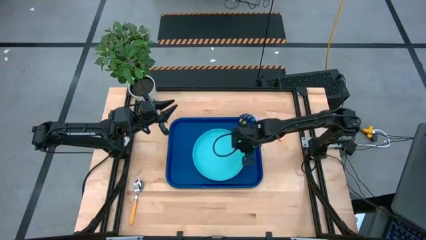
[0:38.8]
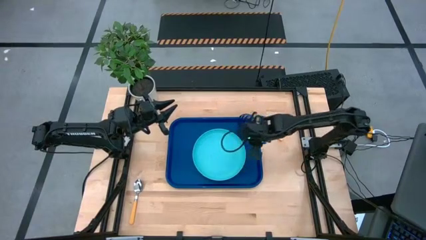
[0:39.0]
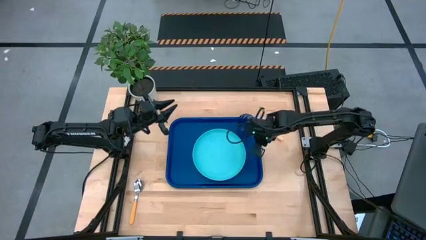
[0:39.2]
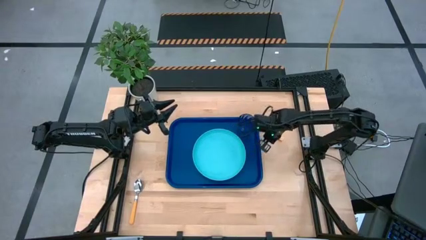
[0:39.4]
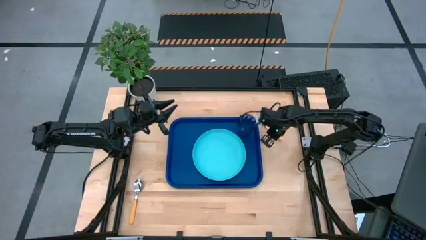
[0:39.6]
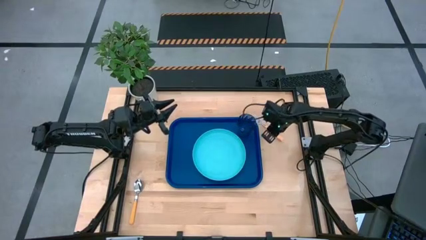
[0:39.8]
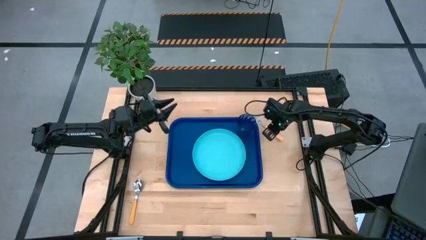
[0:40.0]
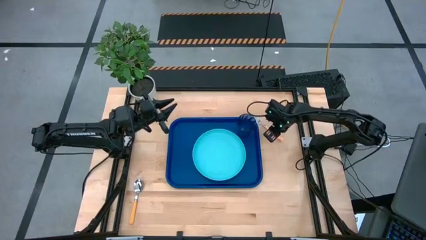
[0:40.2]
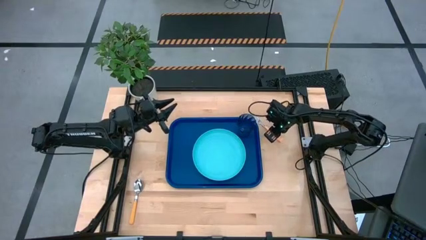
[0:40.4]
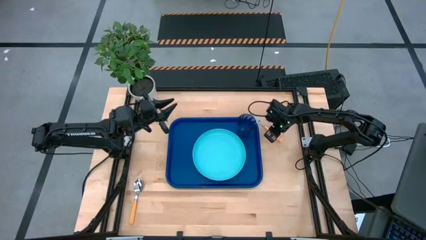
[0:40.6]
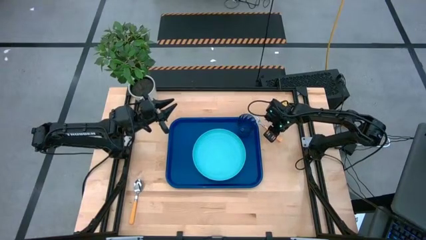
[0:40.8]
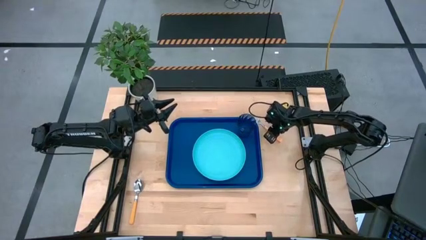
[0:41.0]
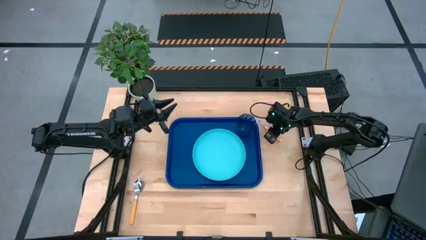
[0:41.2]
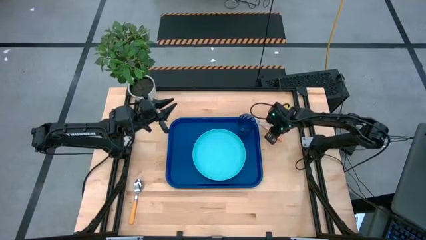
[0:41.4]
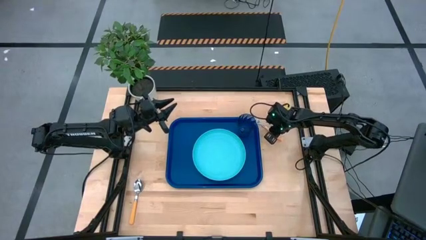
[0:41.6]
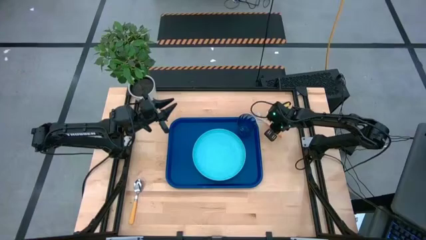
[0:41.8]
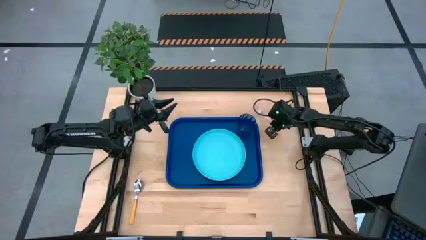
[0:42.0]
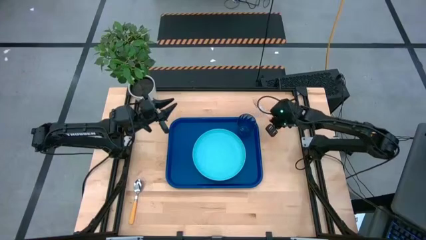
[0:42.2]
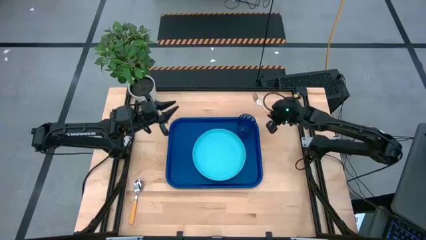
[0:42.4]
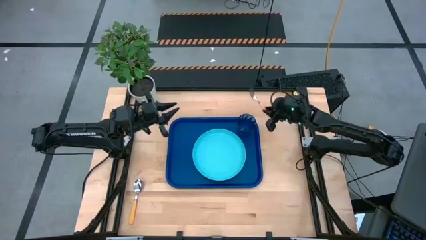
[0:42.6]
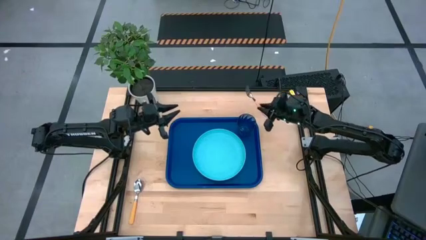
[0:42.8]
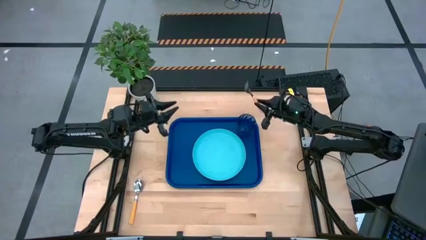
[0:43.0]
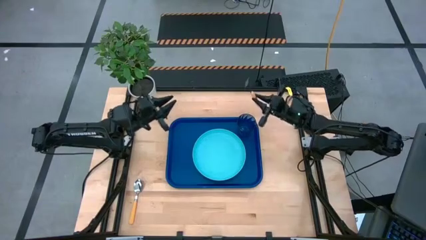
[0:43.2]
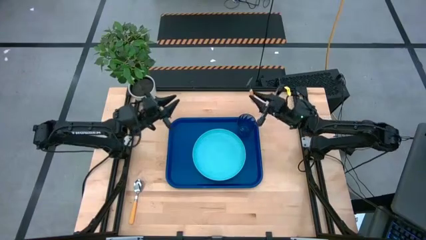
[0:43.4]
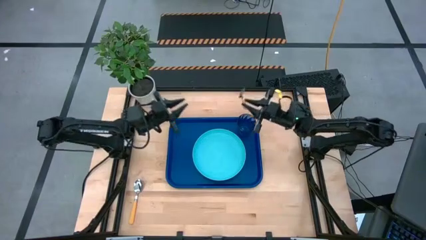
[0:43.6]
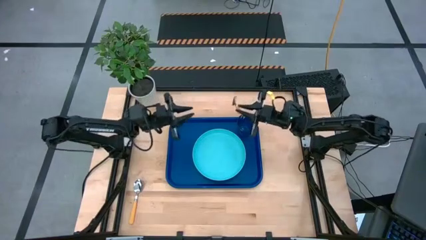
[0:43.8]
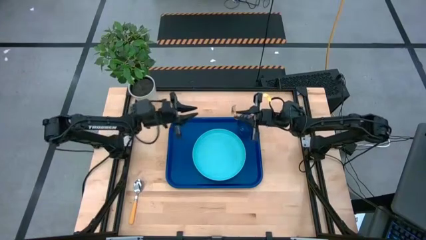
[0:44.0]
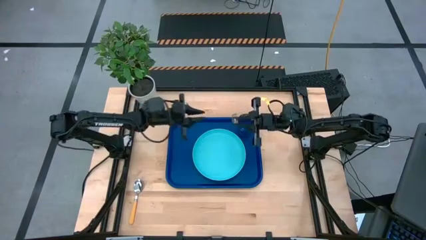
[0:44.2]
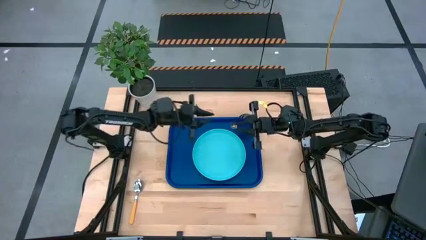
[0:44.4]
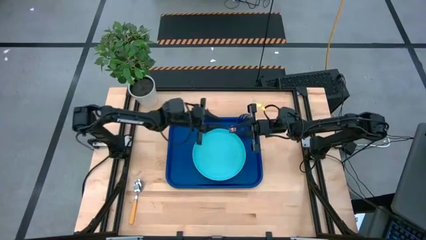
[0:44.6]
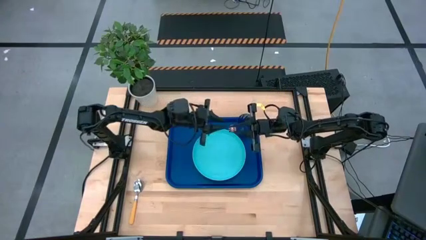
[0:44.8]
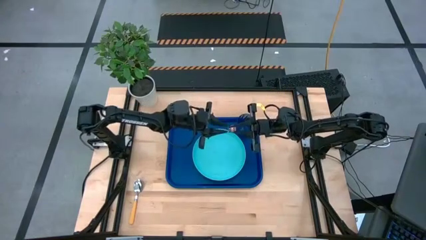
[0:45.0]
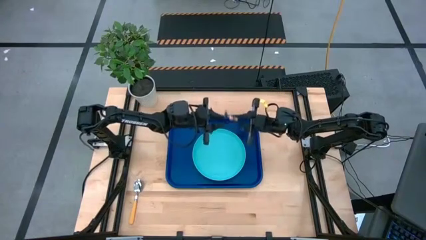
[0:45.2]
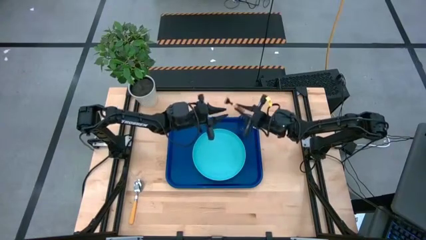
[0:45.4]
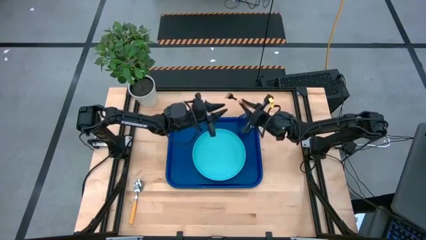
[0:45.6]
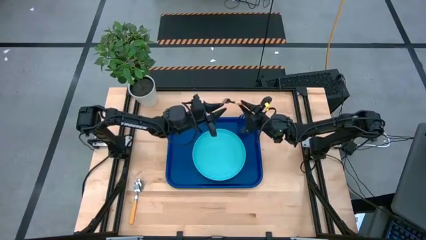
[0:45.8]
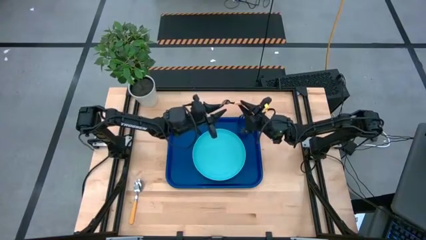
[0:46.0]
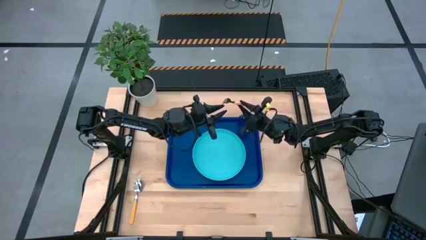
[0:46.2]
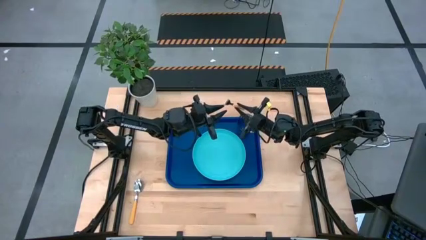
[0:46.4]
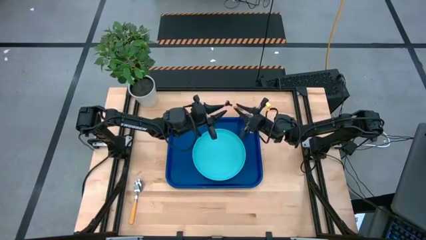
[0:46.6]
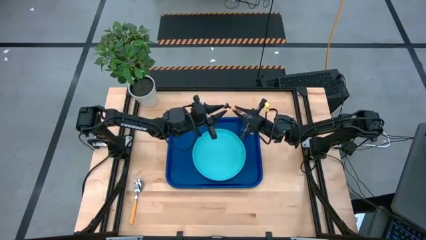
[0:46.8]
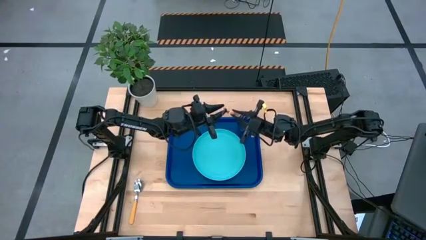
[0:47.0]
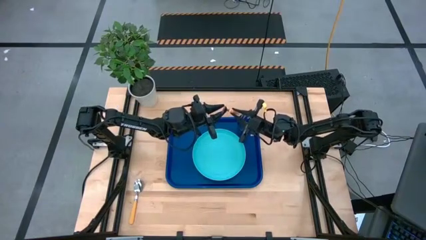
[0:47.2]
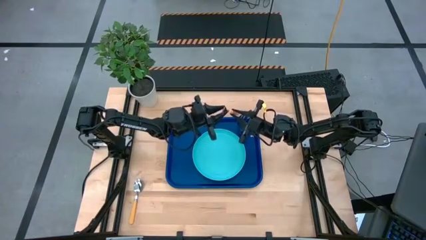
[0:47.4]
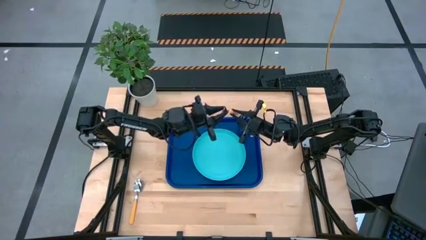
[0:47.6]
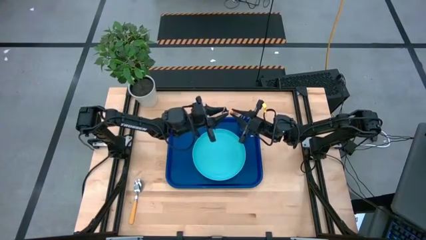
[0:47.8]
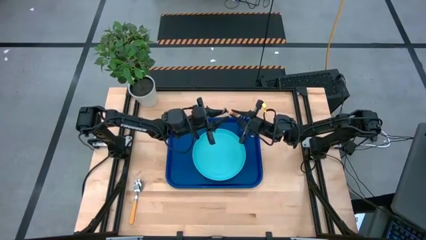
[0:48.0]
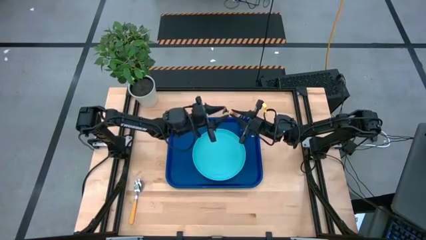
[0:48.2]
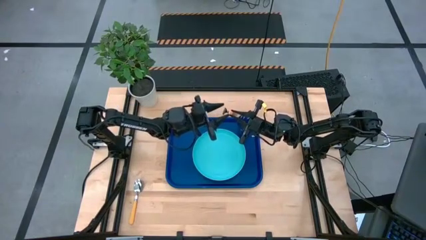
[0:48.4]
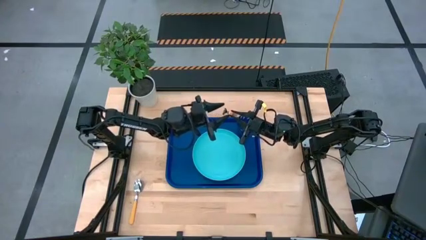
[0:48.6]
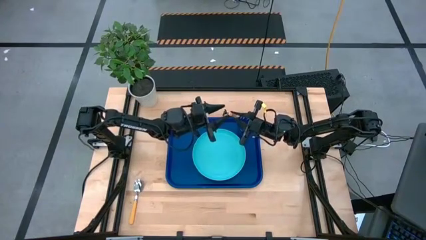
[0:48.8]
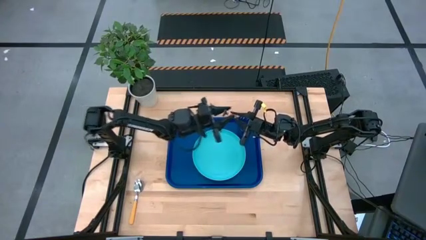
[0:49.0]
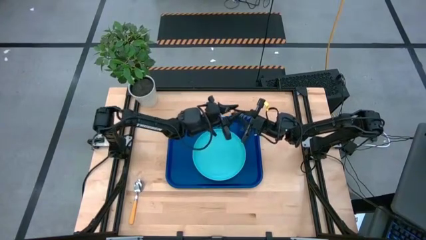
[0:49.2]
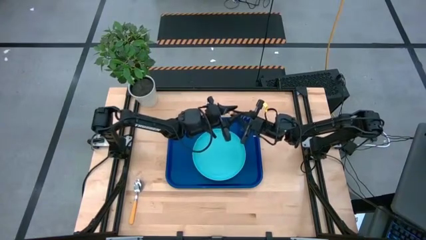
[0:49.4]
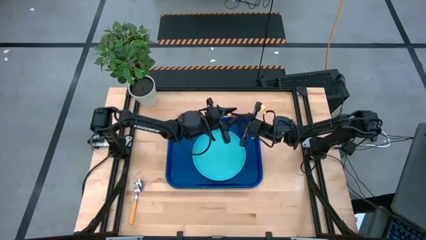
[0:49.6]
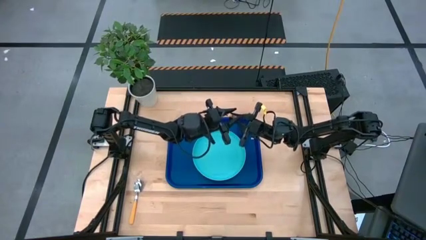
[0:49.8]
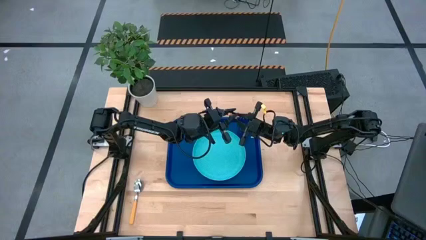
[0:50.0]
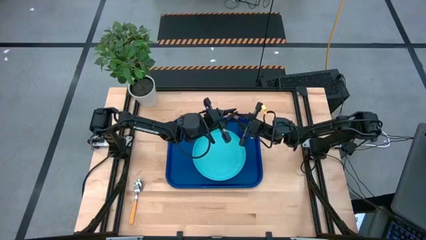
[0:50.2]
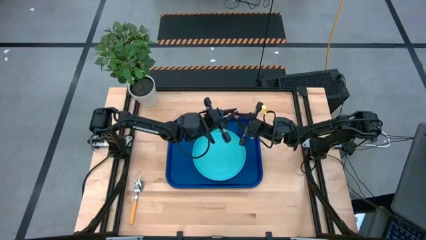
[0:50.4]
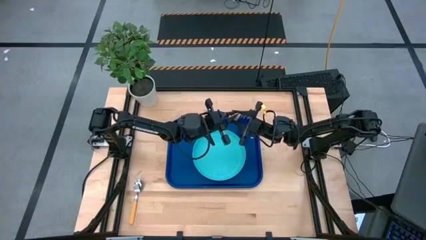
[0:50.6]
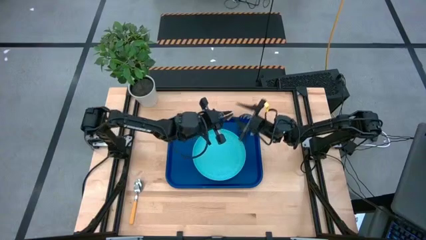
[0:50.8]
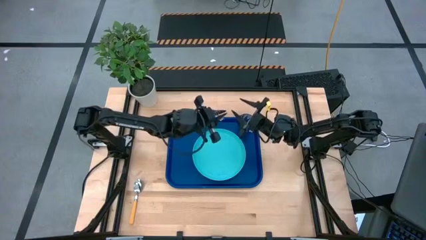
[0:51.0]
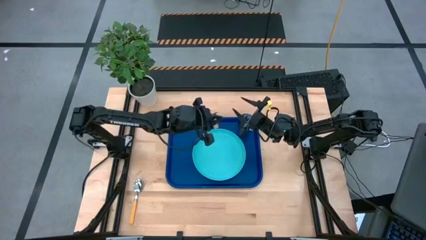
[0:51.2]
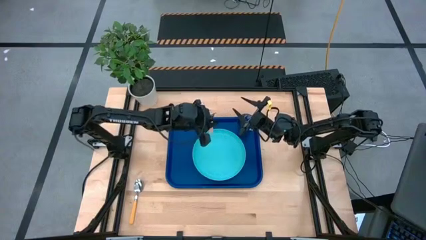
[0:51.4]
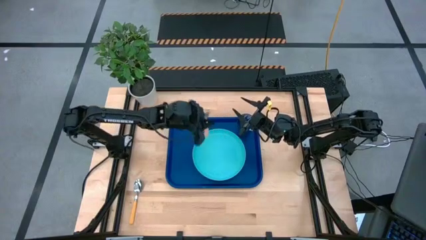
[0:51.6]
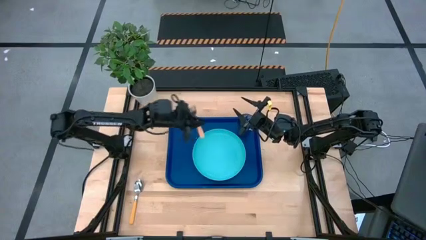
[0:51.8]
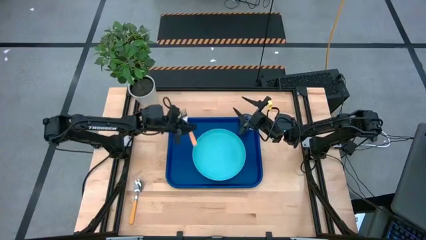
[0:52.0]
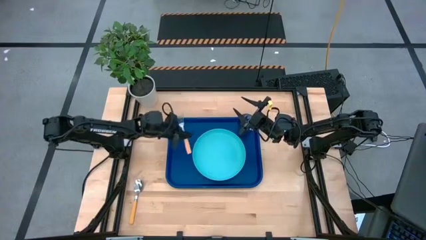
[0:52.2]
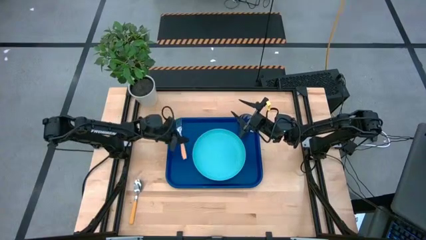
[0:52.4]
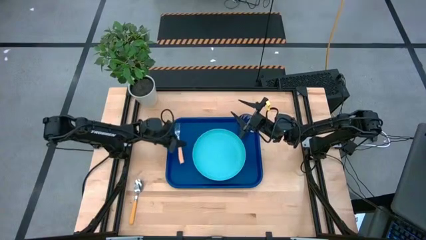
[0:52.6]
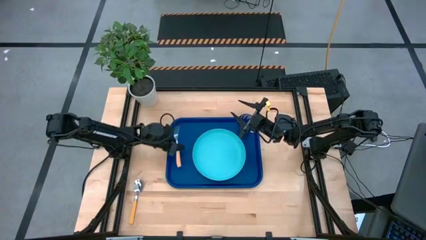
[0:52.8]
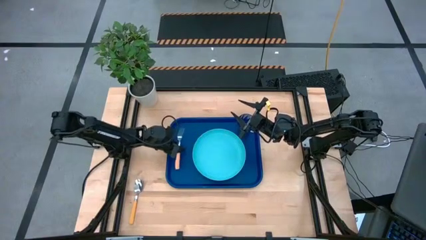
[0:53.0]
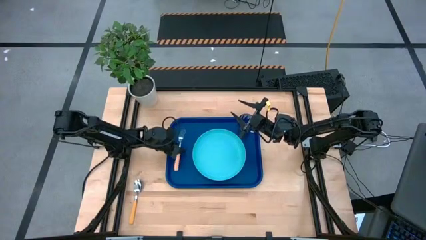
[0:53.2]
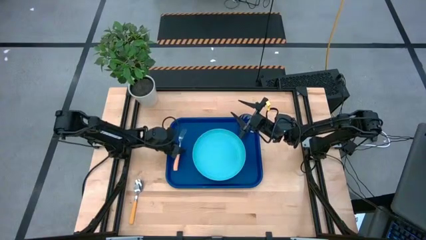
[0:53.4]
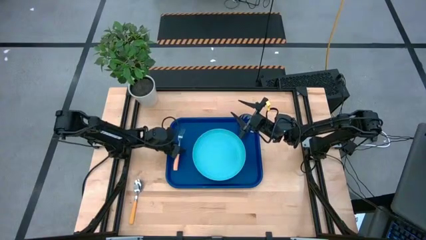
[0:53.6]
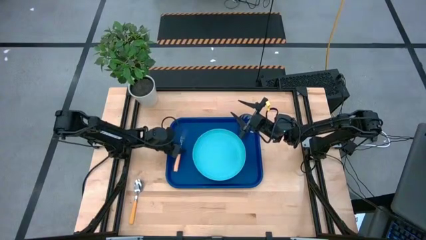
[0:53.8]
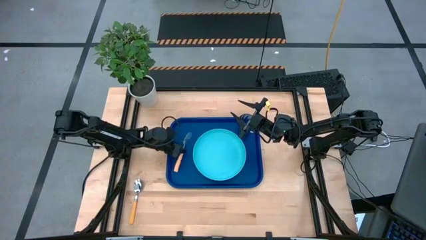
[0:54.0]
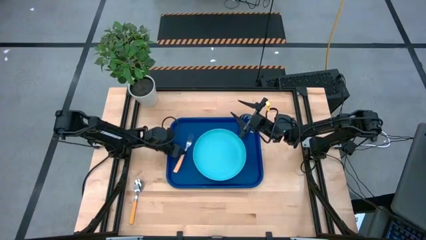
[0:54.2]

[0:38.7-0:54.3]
Task: Pick and place plate/cup/fork/spoon on tray
Put the yellow fork to the left of the blue plate on the blue serving tray
